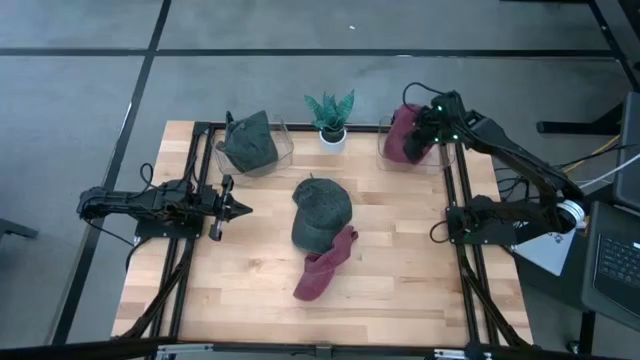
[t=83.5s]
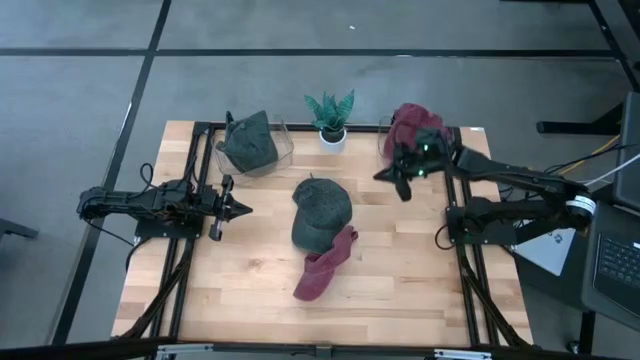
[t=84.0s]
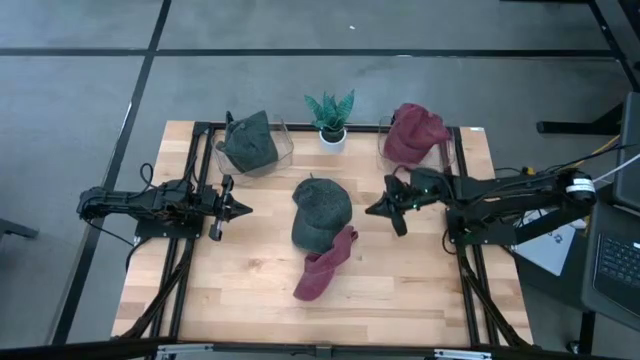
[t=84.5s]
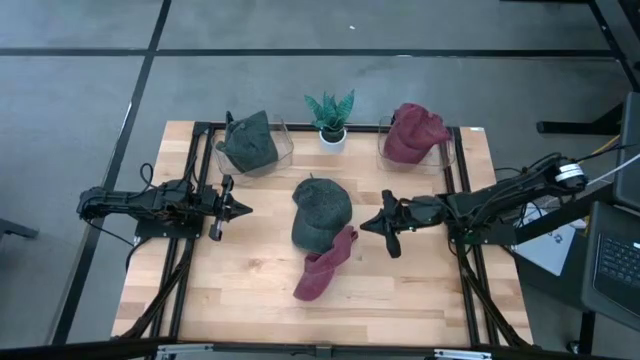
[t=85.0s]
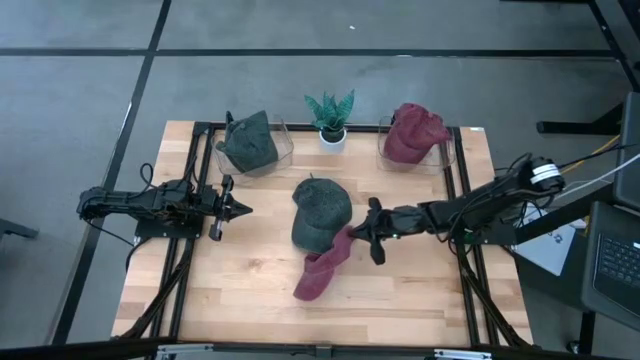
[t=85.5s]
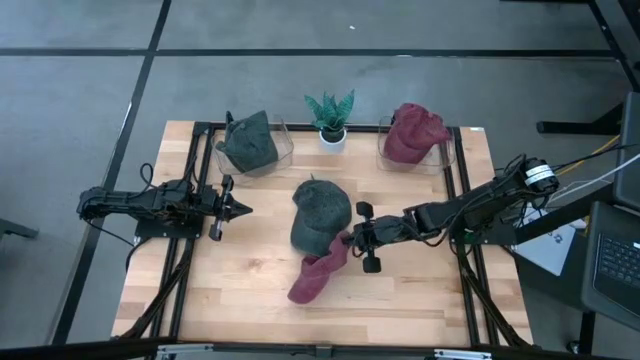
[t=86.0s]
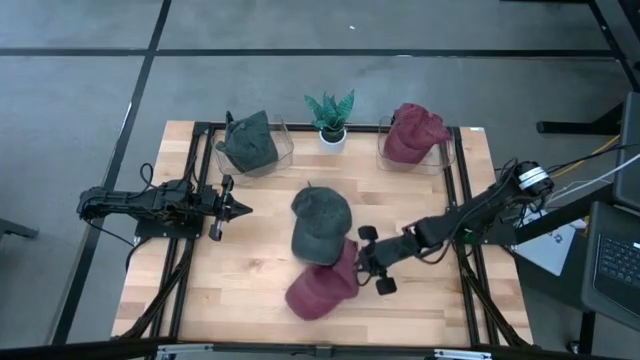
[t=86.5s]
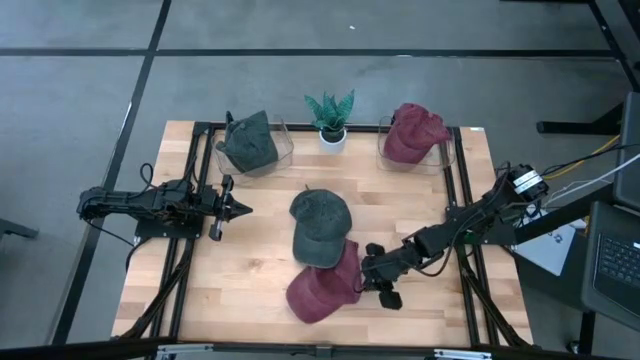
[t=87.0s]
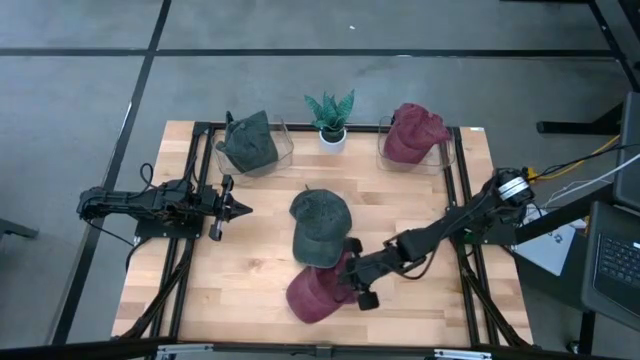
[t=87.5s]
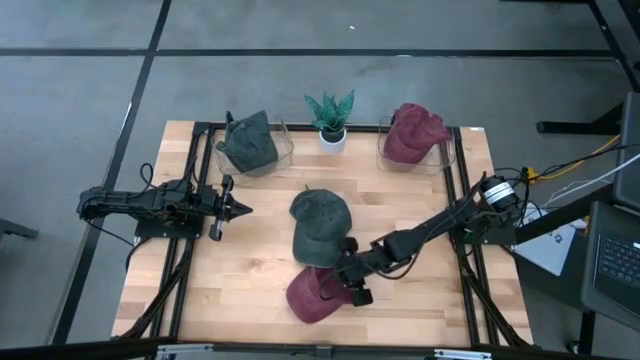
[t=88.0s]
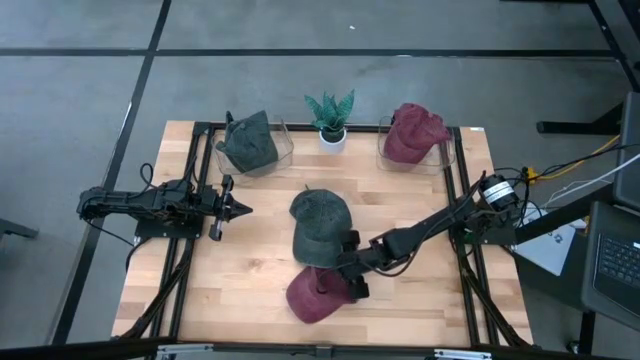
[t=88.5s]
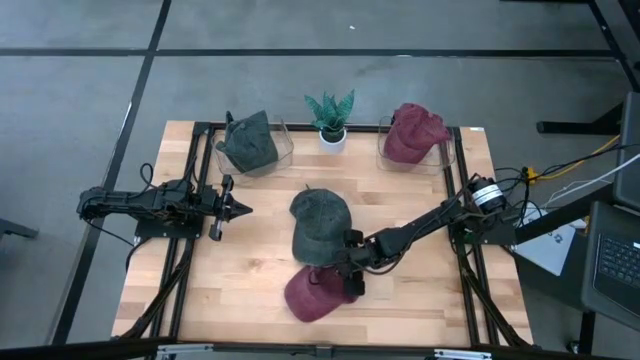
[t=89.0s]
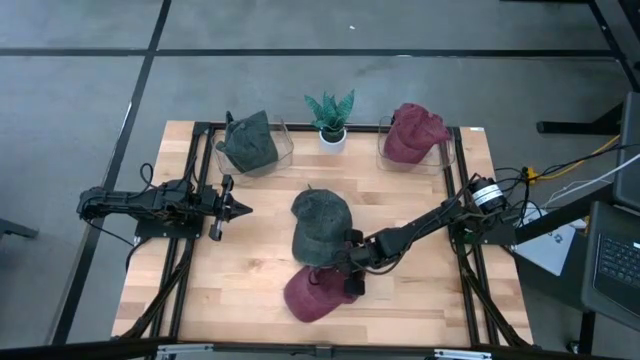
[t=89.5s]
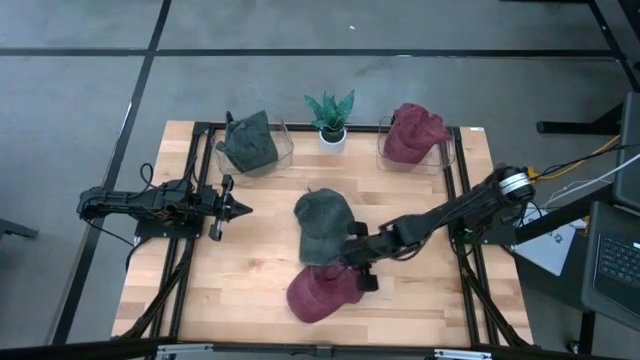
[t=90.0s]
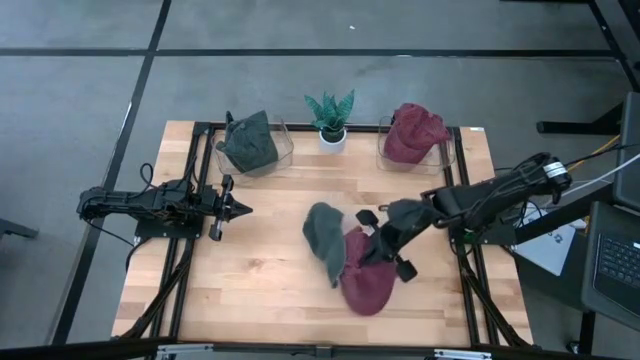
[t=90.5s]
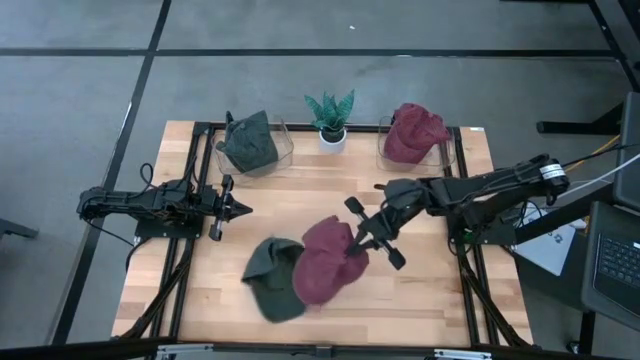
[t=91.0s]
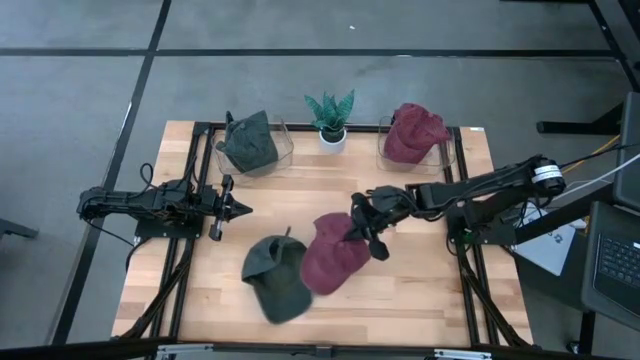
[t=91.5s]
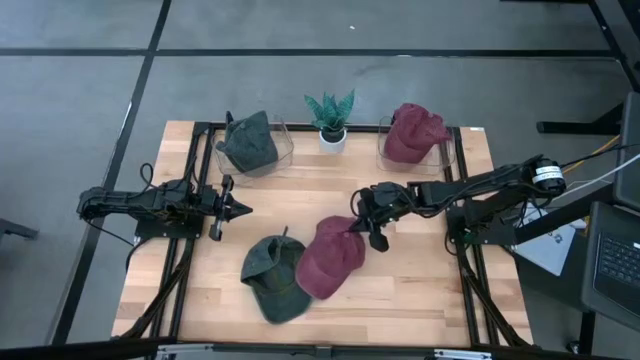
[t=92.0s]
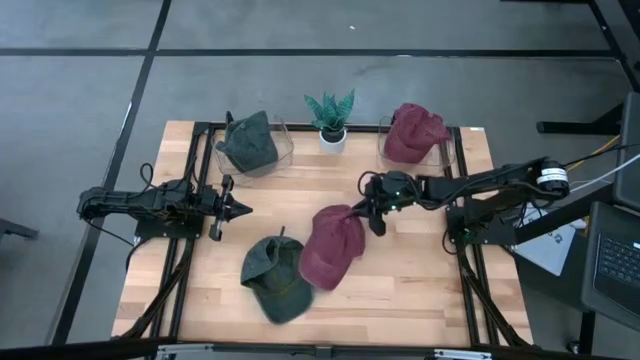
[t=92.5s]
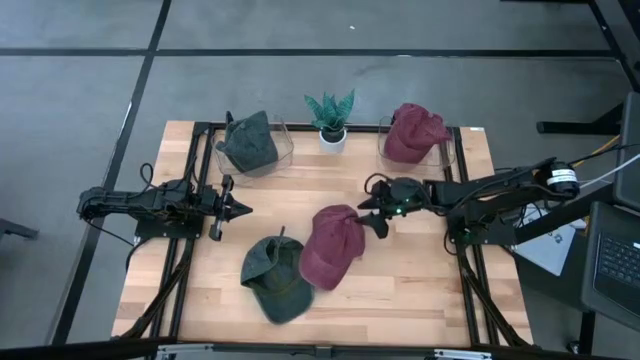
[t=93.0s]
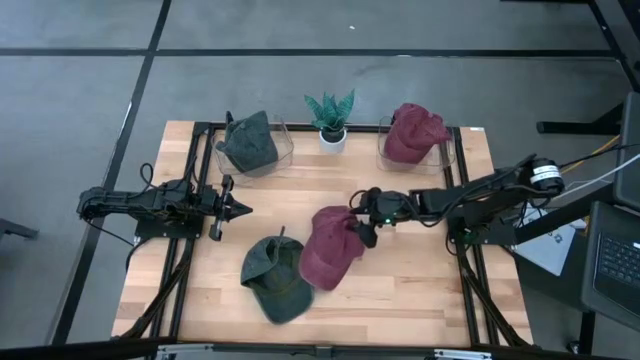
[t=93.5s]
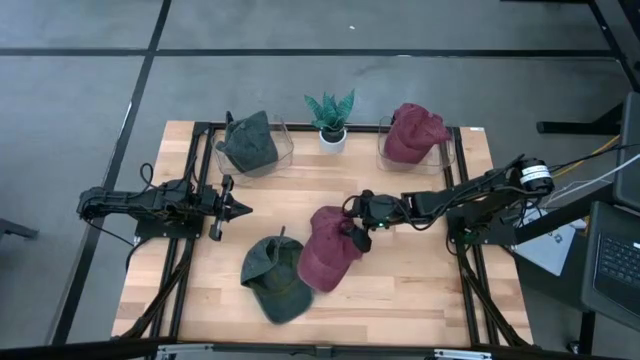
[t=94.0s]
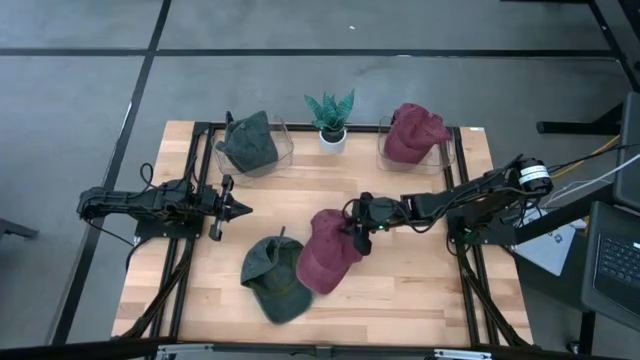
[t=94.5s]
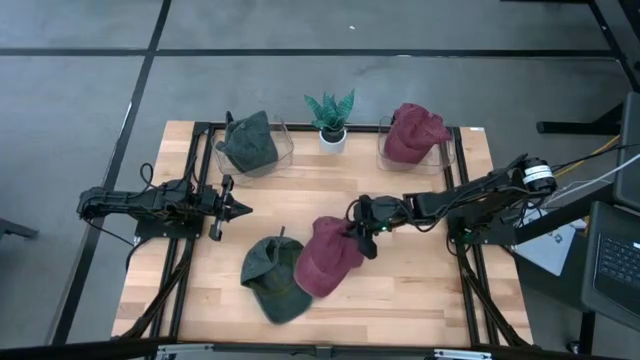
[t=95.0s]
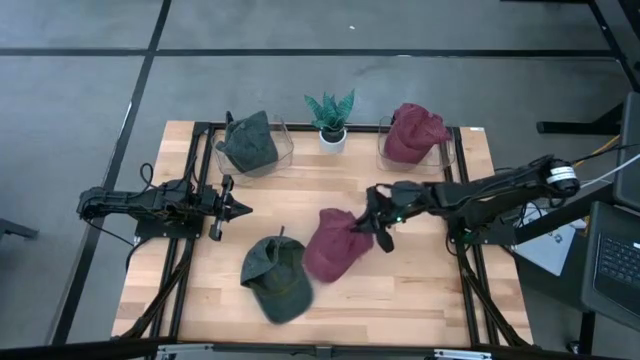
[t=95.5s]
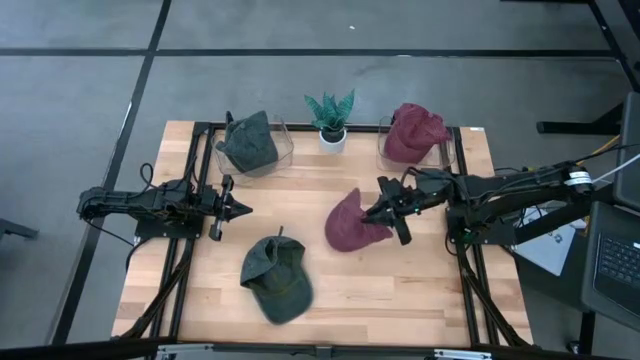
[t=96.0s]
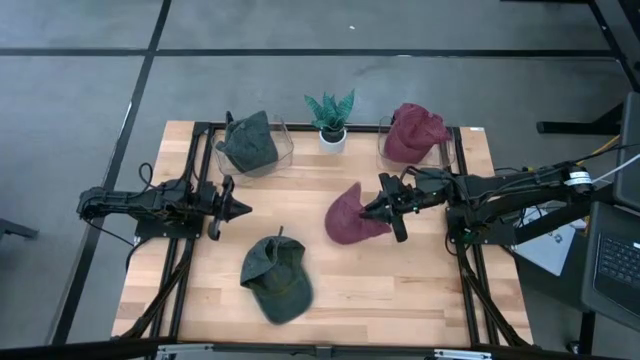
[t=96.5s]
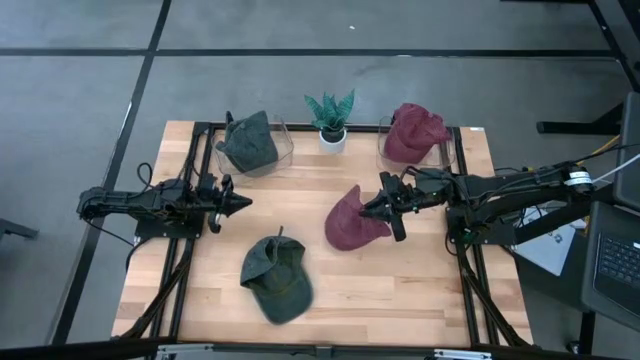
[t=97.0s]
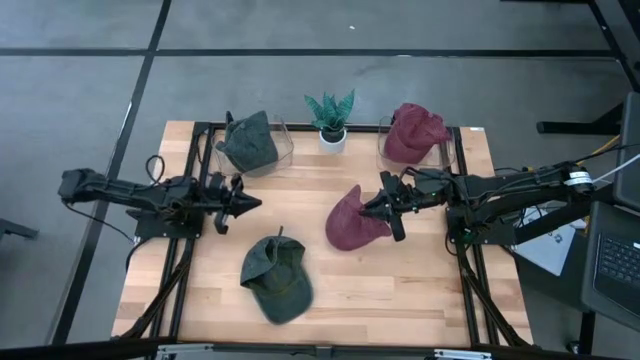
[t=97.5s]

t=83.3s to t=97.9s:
Task: Pick & Place hat
Put the red cap into the right transparent bin

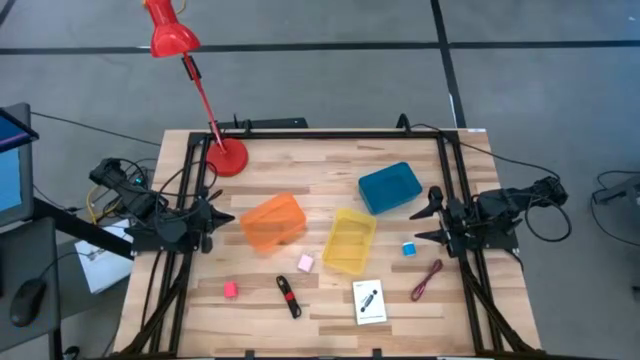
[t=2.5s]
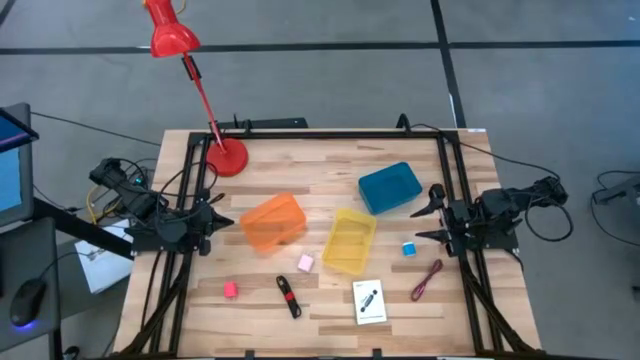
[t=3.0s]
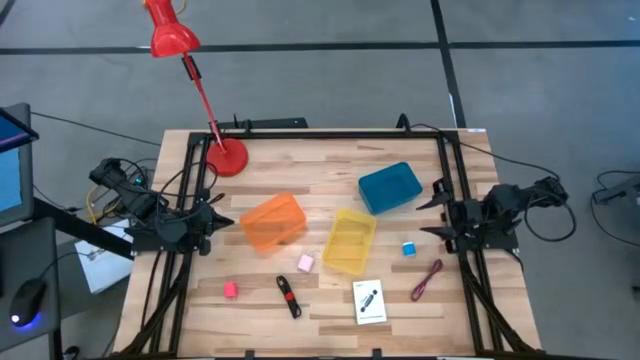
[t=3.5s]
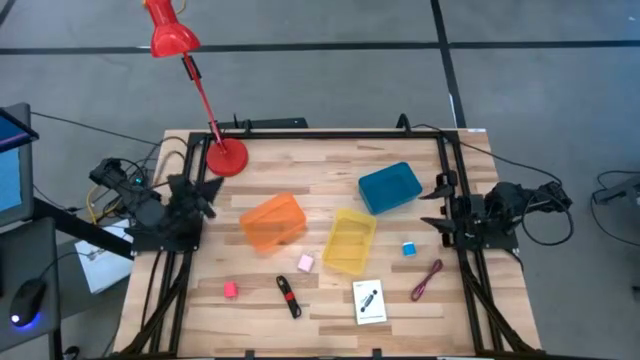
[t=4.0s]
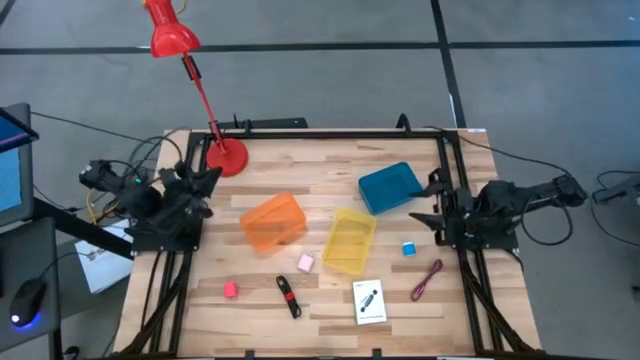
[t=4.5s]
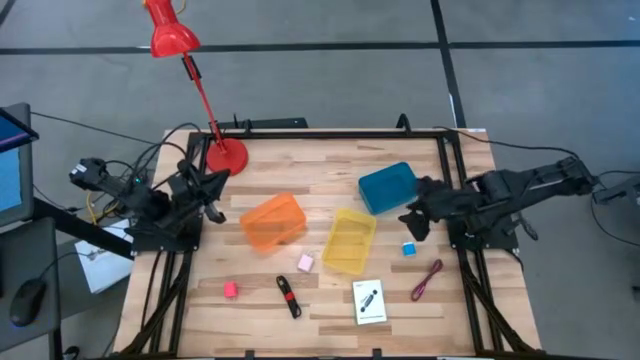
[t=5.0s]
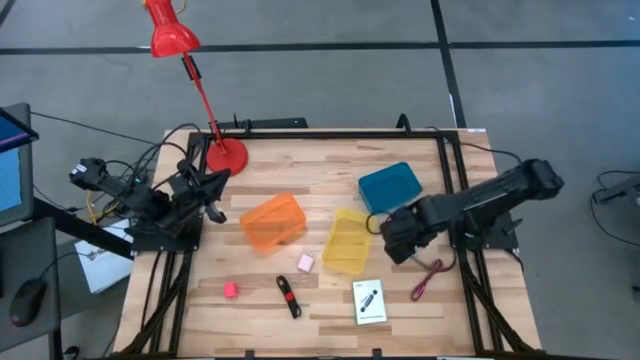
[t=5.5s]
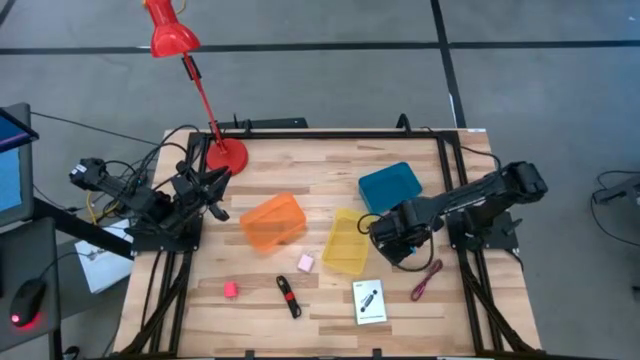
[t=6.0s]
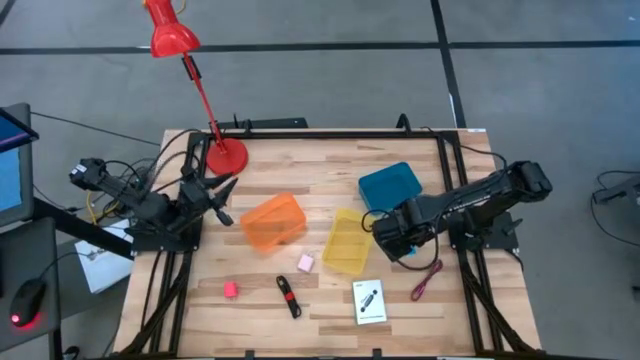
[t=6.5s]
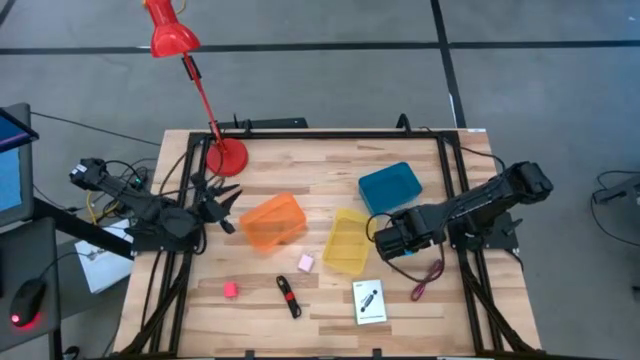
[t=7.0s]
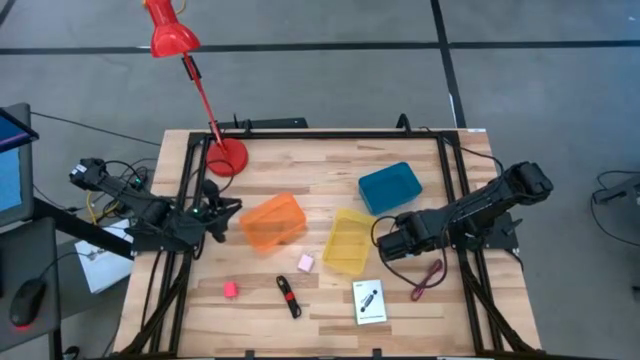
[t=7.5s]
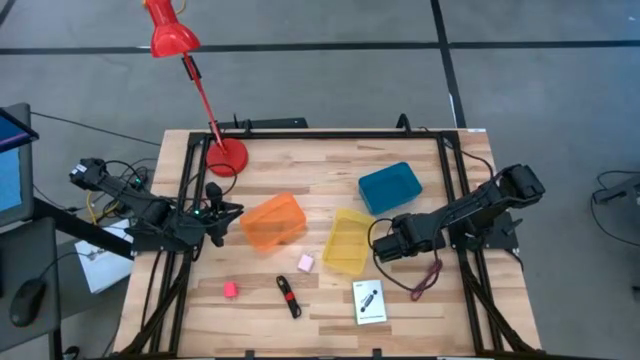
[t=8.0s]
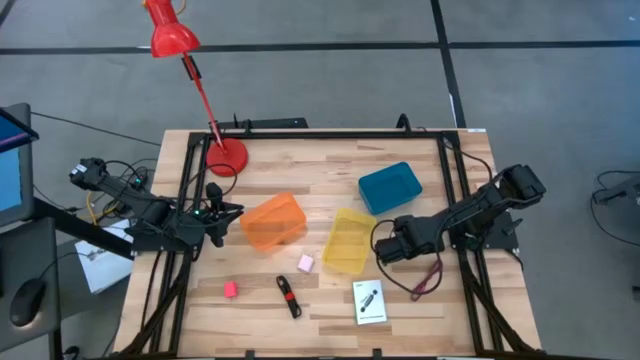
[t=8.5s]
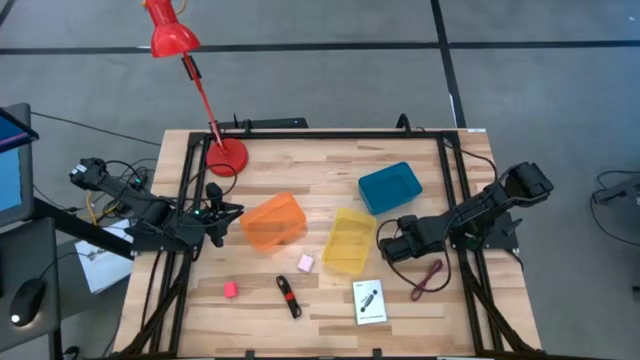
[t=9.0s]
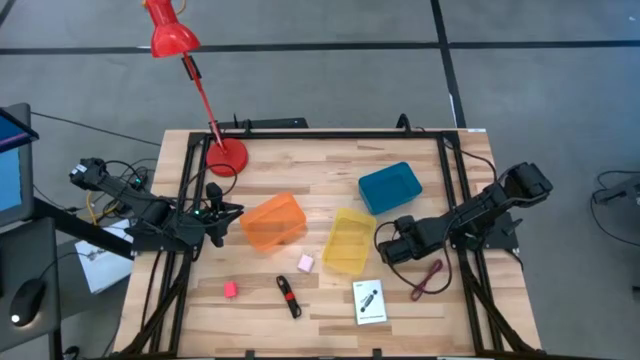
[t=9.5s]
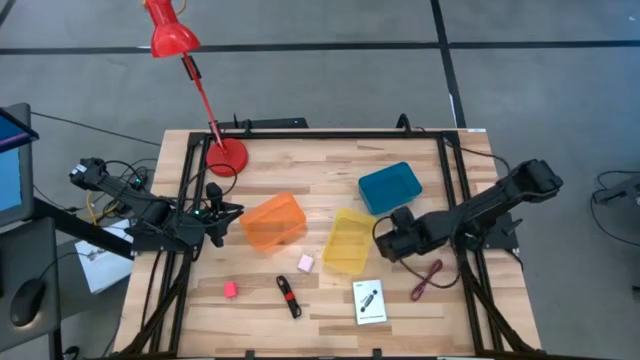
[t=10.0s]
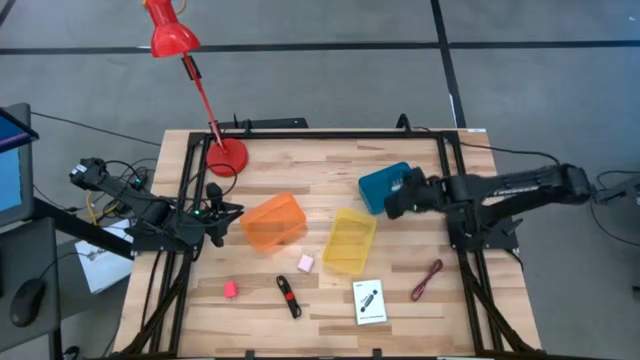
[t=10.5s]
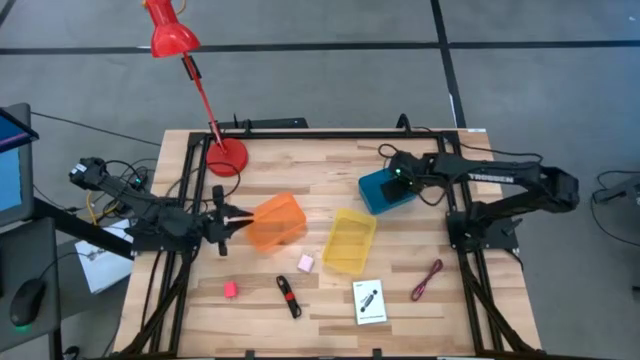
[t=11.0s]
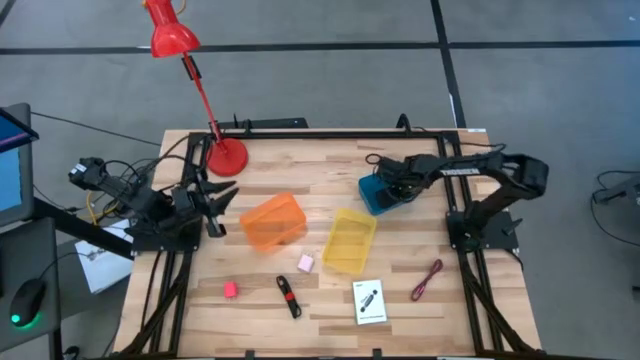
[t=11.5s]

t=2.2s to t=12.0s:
Task: Pick and place items into bin
Put the blue charger adapter into the blue bin
